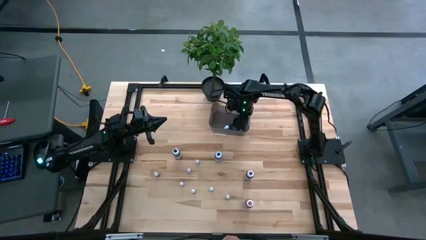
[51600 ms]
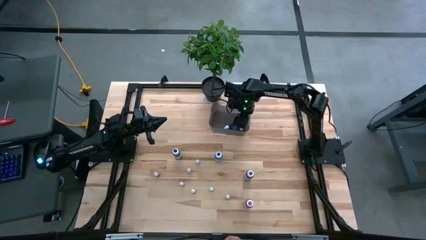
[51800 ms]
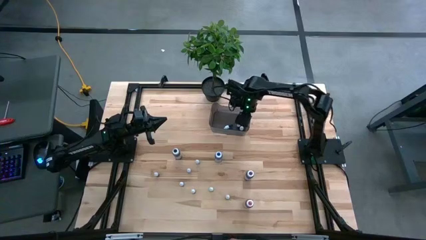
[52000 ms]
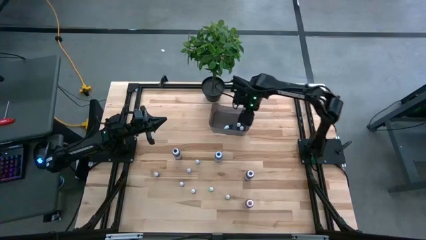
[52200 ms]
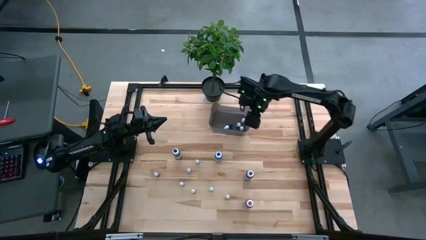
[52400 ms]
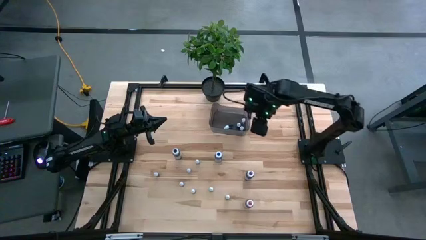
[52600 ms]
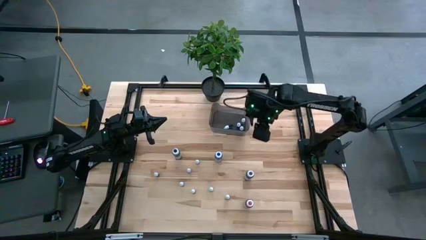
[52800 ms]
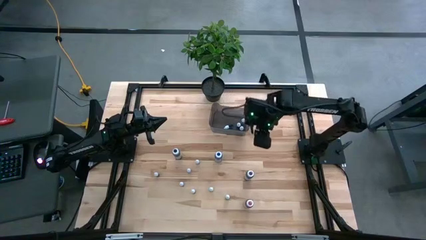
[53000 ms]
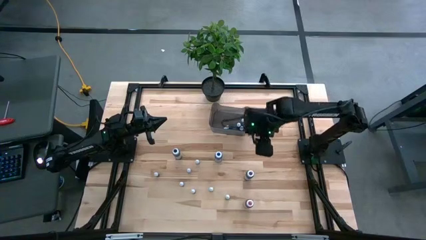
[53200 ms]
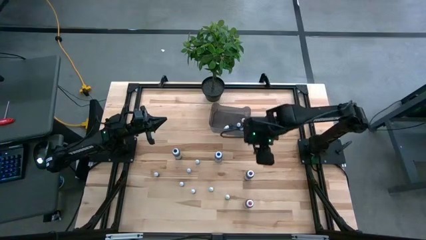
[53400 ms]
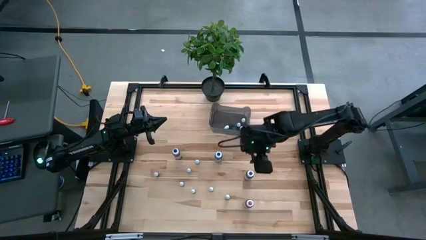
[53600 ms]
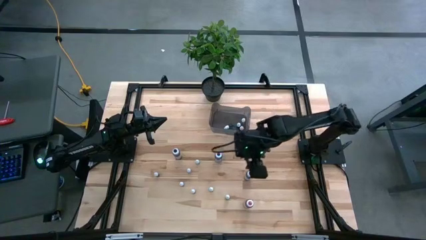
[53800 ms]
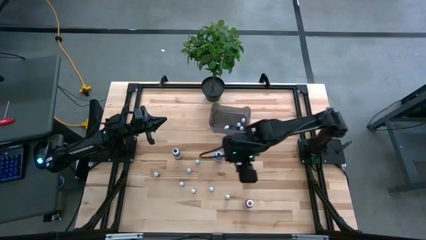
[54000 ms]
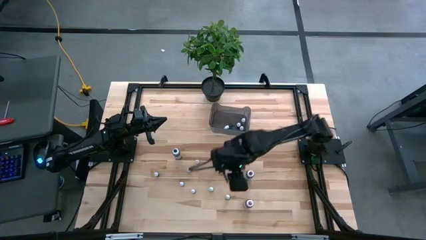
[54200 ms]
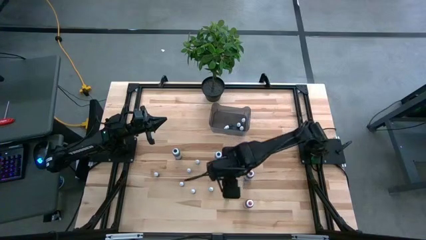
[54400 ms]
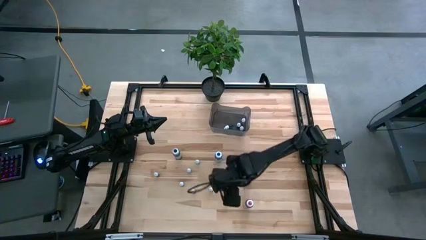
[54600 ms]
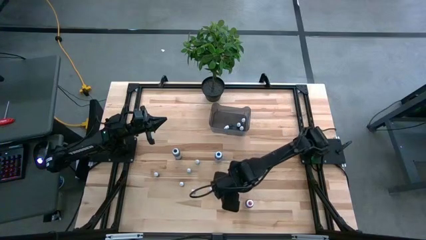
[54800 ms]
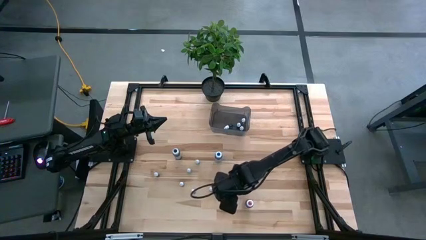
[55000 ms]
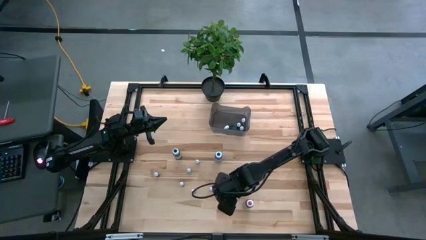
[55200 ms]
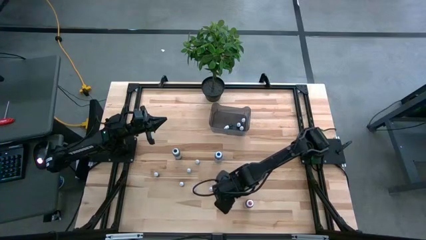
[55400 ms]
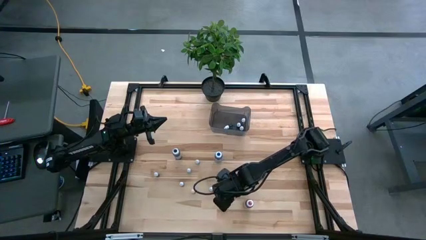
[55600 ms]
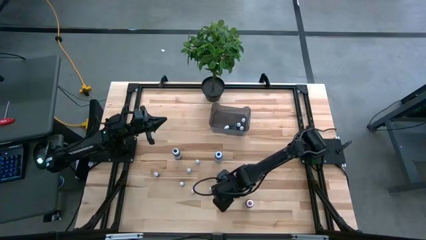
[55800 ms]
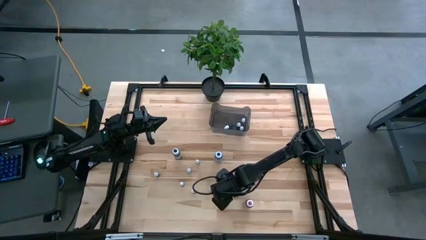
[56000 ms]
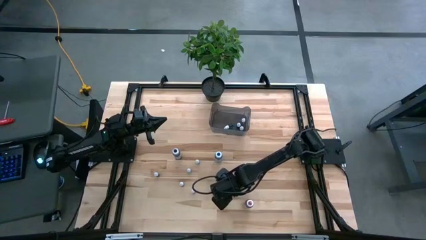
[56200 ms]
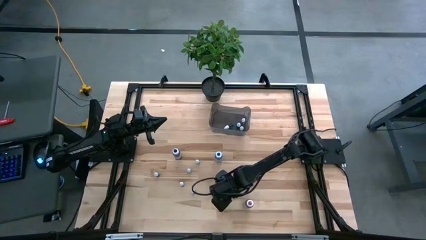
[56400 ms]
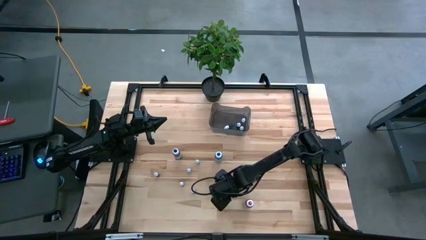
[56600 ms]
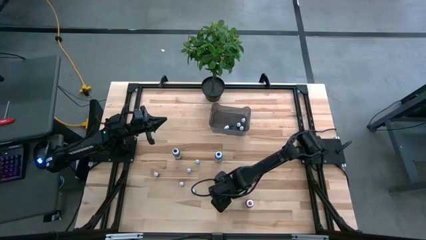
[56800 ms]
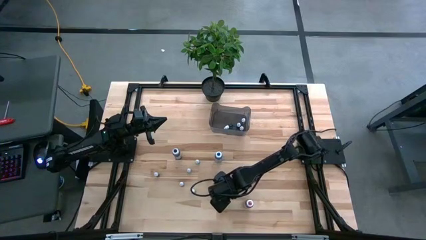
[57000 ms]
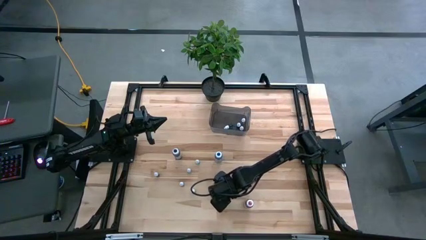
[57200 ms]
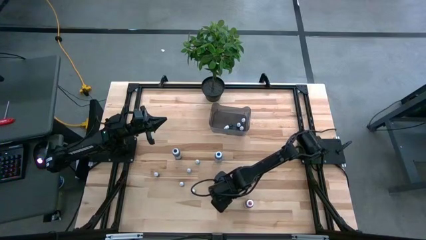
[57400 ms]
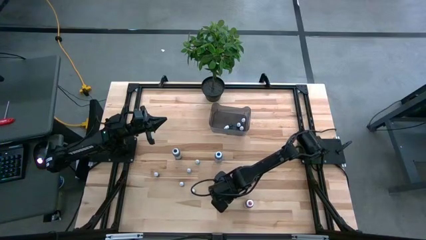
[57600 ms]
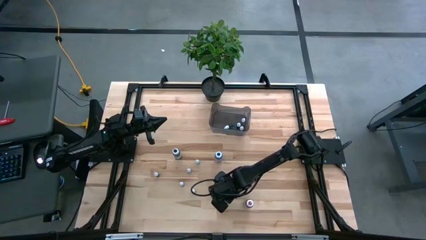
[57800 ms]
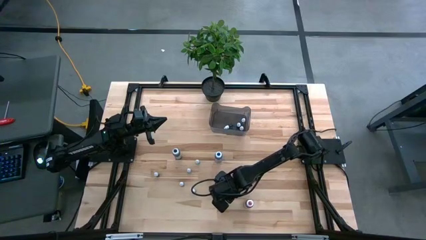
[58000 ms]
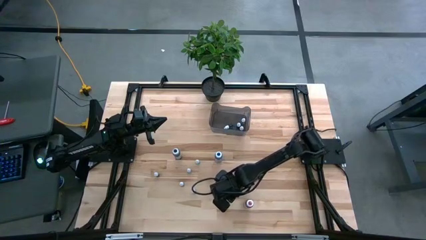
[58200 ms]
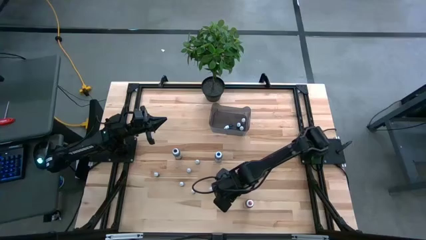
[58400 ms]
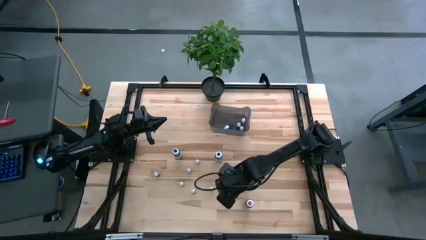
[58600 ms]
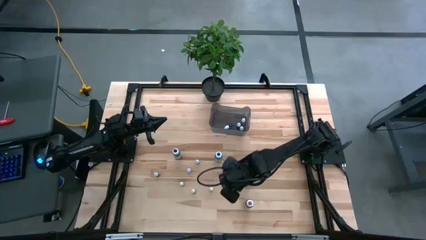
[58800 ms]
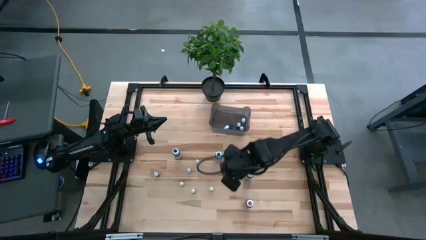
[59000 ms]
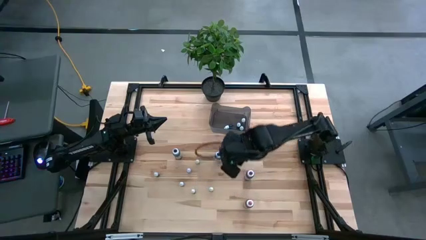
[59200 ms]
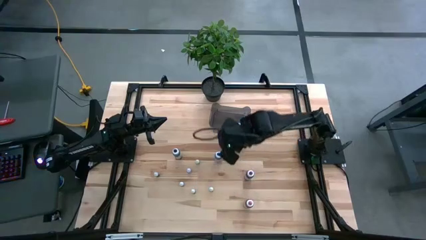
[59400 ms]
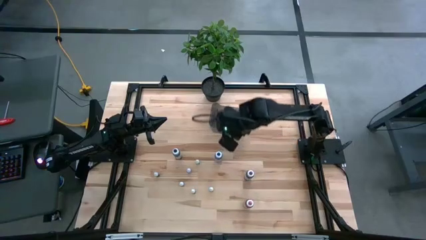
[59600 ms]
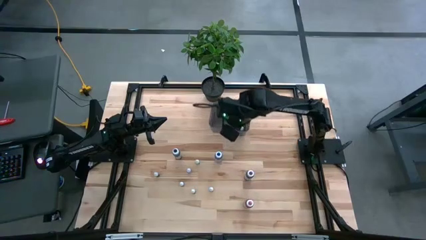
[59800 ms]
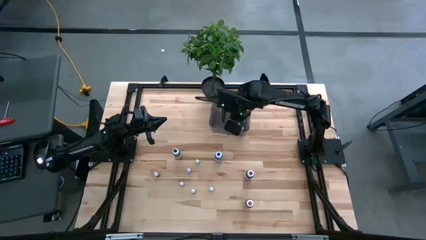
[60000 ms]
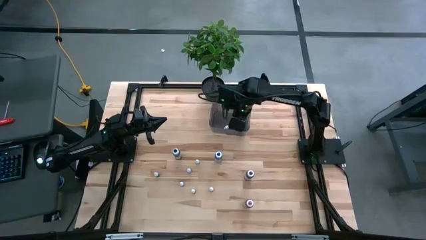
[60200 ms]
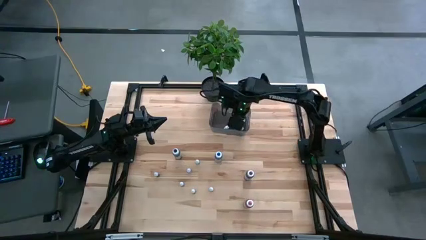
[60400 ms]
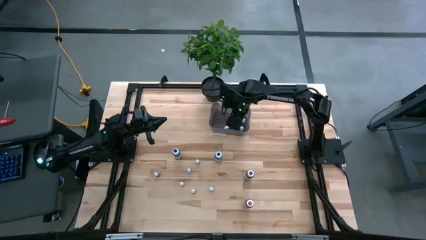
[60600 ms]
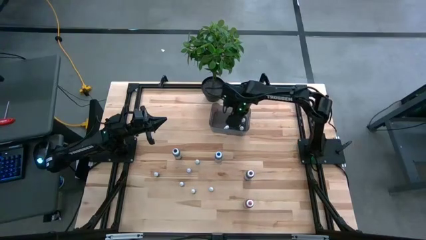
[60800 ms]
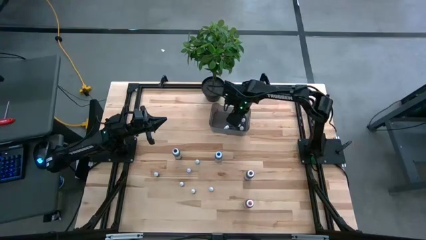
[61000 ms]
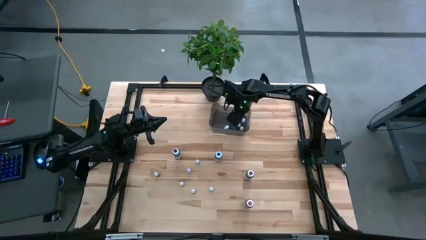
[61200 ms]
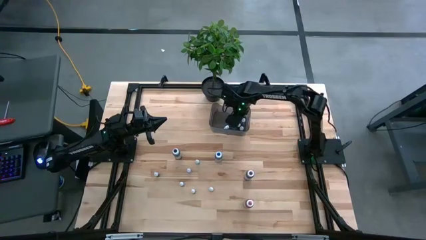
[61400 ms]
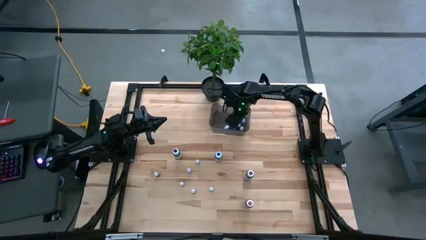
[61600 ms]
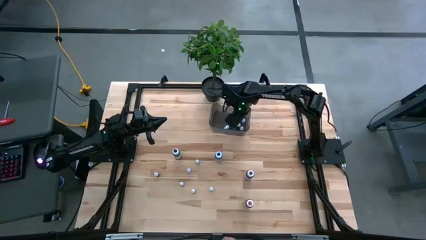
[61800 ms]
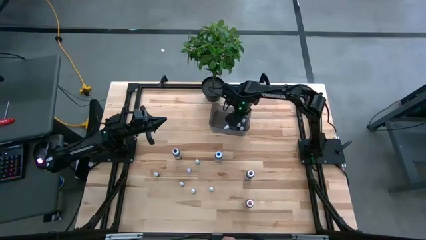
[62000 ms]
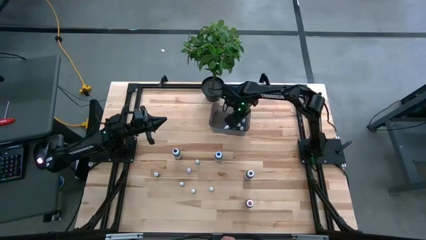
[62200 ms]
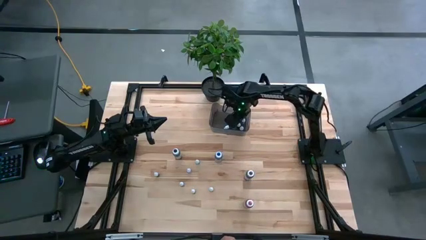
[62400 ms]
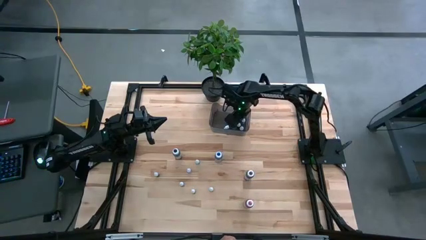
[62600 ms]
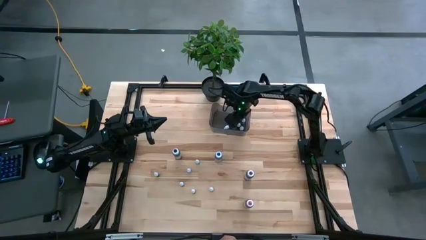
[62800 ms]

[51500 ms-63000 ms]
Task: Pick & Place food coloring
Put the small black food coloring bottle into the black bin

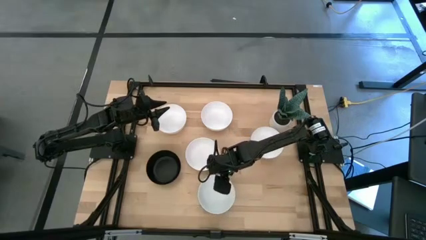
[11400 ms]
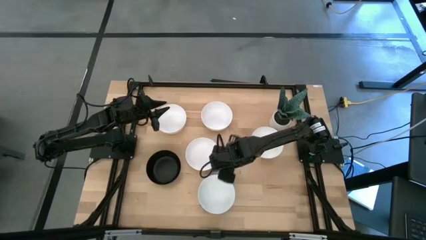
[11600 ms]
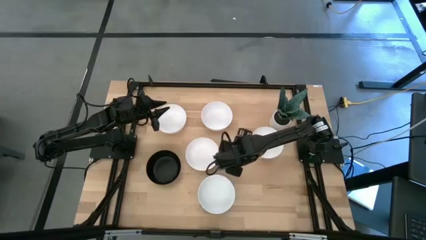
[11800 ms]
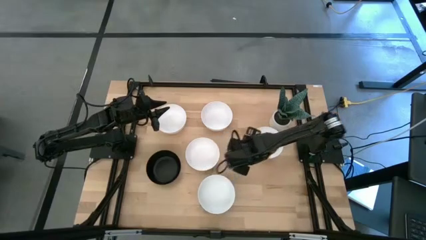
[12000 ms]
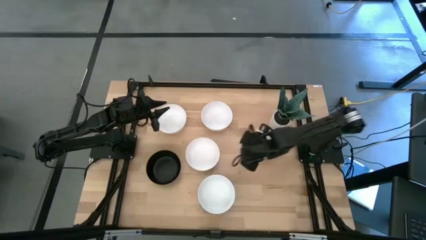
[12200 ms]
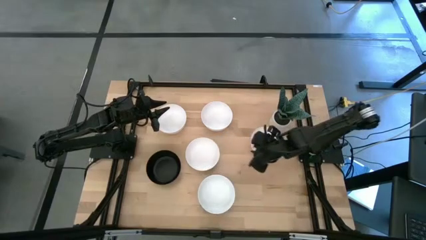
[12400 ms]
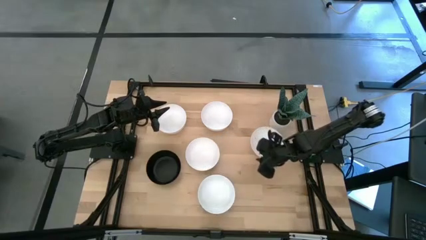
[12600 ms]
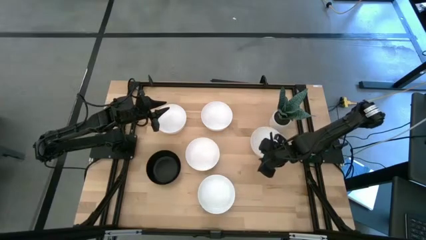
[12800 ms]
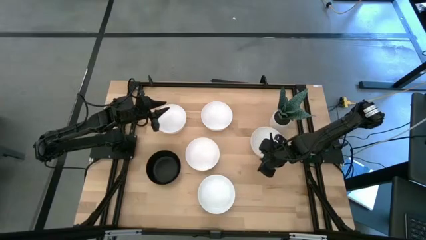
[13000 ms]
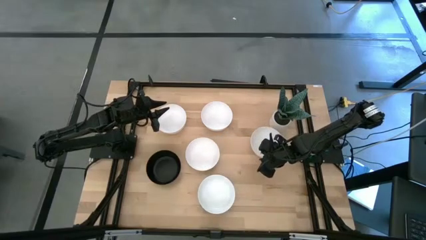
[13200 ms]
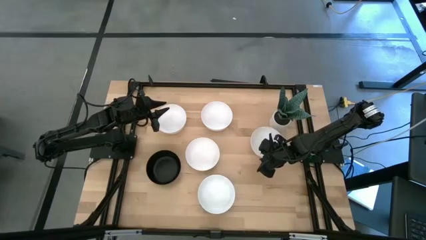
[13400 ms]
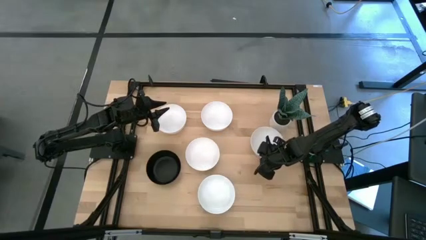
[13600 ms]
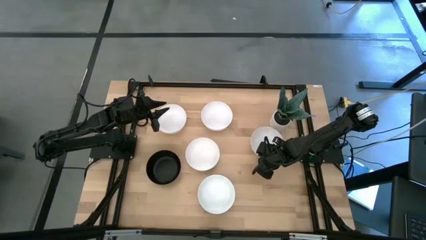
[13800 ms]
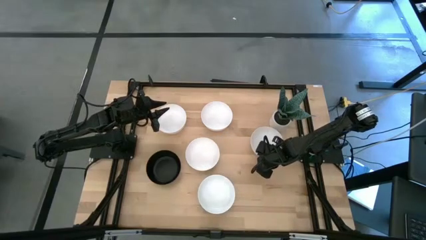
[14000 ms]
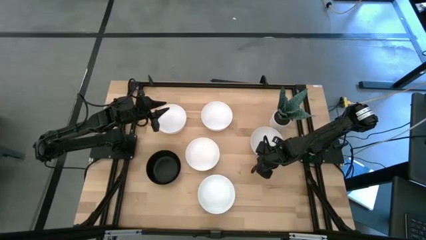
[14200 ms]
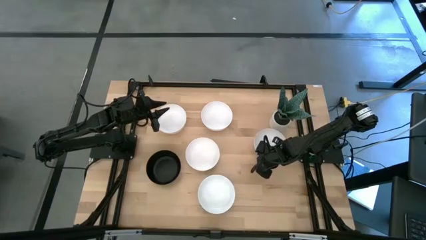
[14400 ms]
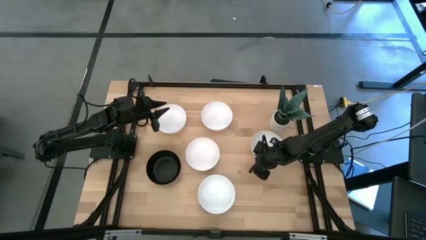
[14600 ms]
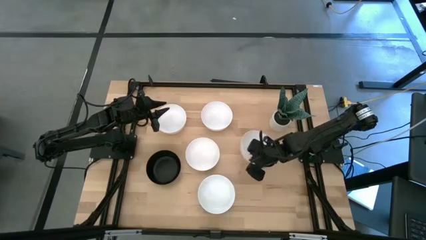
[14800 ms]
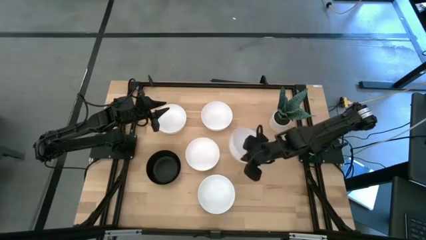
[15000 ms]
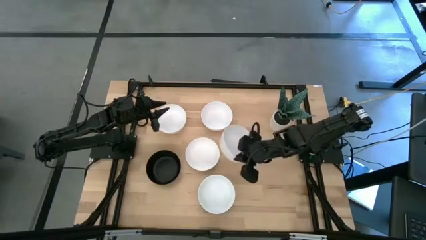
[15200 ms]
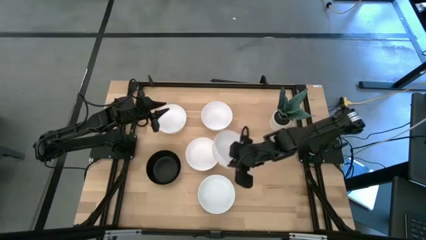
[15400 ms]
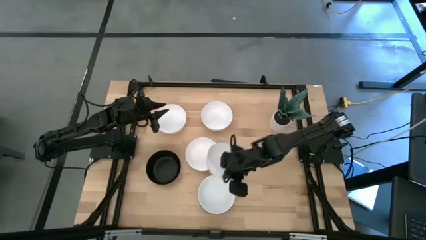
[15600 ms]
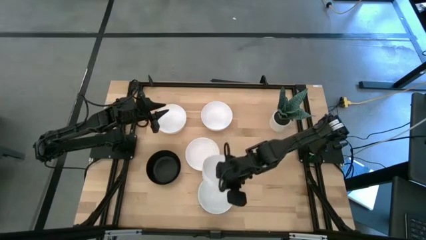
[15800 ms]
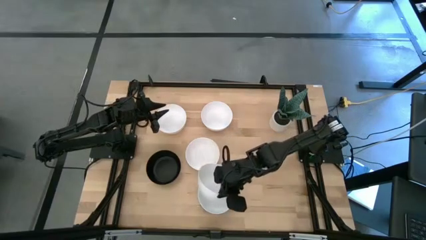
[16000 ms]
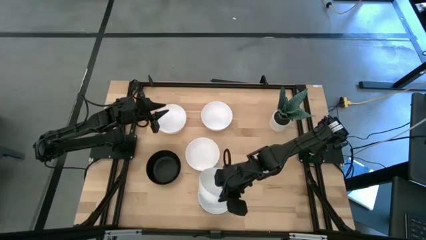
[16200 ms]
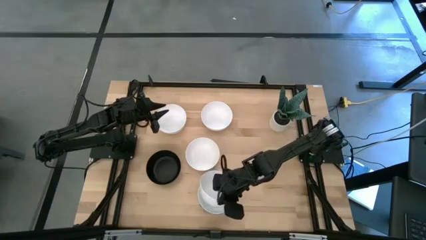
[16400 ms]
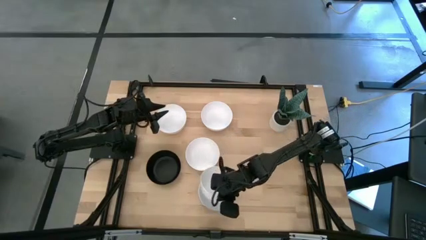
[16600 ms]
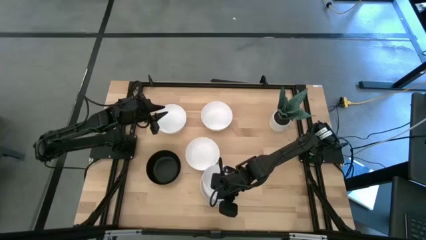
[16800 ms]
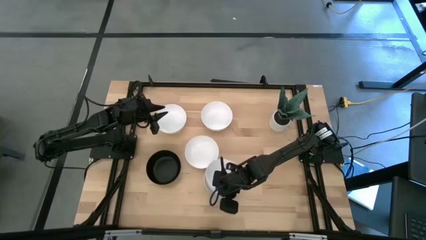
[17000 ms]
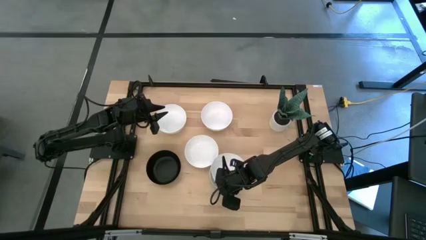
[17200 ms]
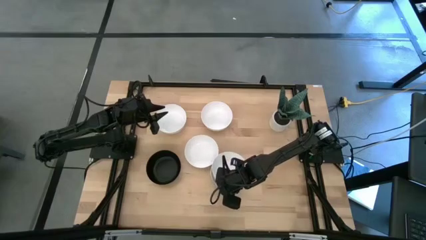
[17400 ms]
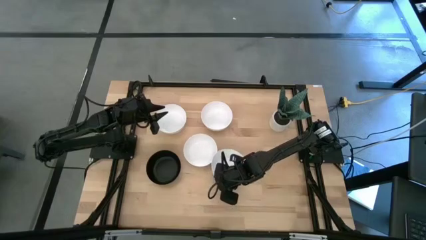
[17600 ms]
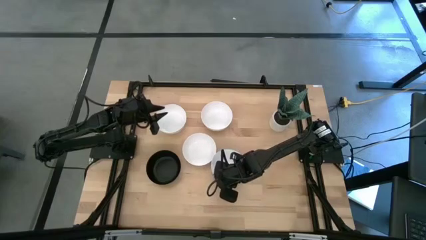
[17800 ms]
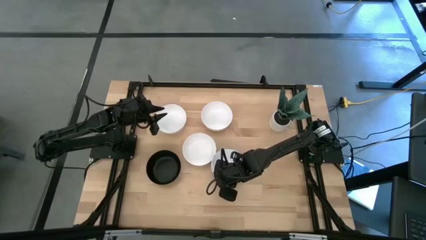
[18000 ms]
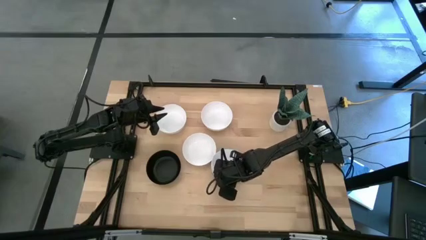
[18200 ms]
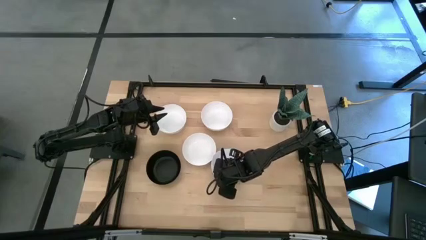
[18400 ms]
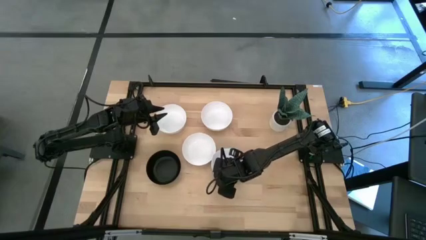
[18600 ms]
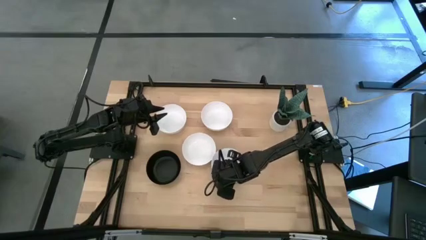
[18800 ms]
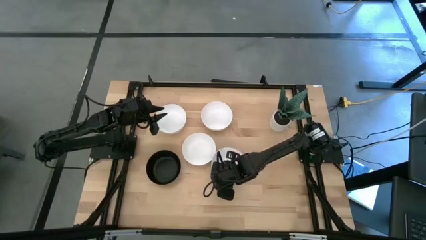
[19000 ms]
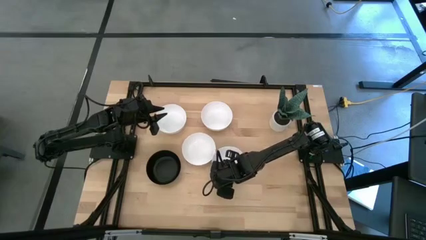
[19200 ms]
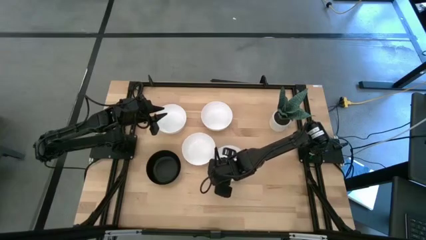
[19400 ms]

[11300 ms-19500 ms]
Task: Nest bowls inside each other
Stack the white bowl on top of the stacked bowls
